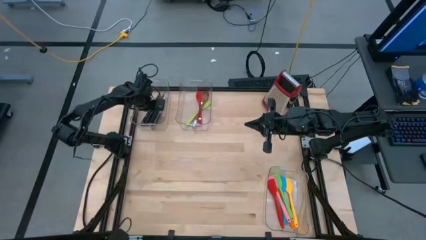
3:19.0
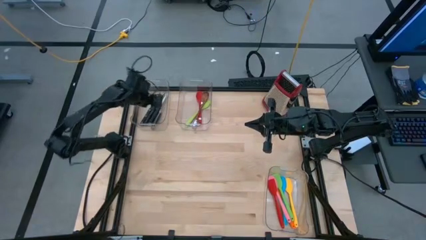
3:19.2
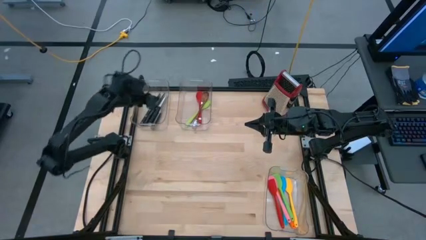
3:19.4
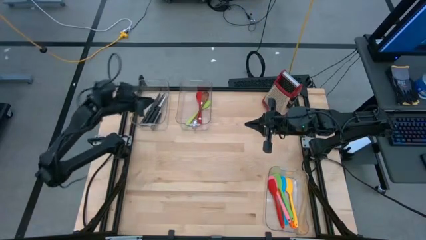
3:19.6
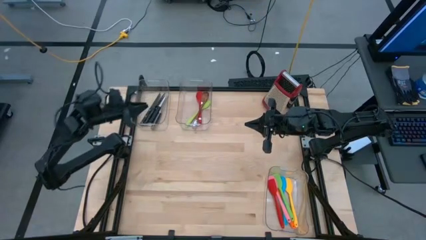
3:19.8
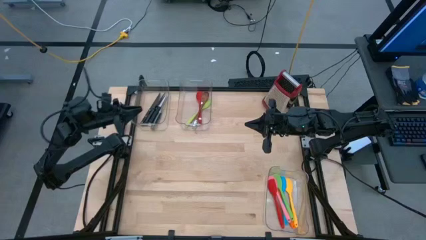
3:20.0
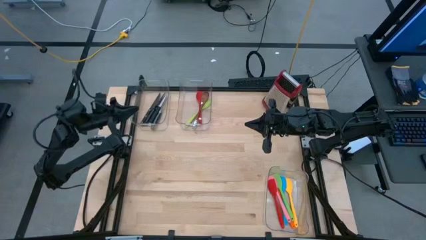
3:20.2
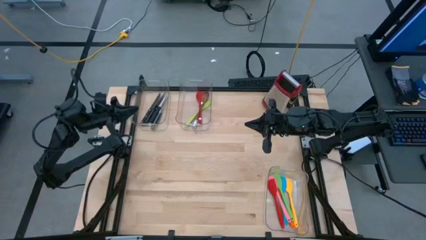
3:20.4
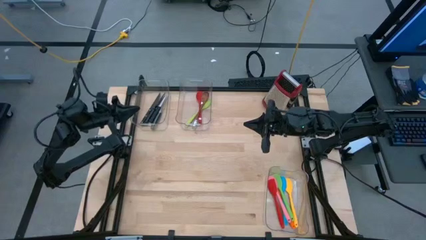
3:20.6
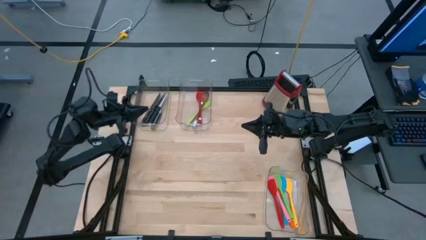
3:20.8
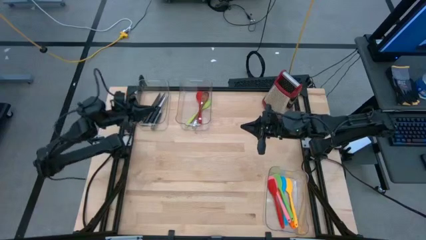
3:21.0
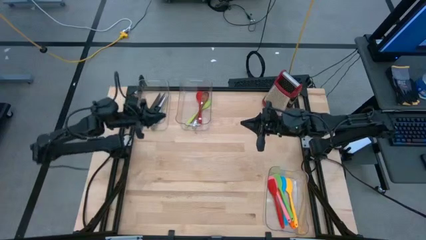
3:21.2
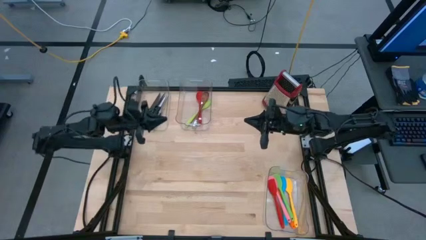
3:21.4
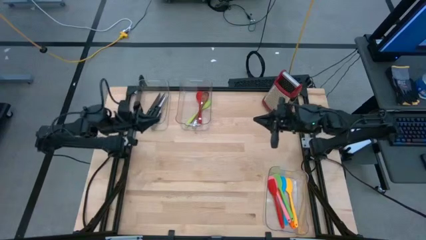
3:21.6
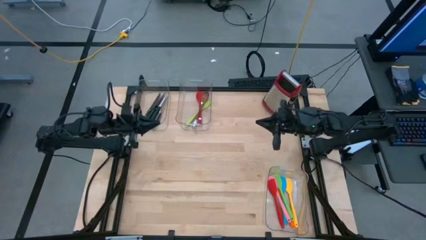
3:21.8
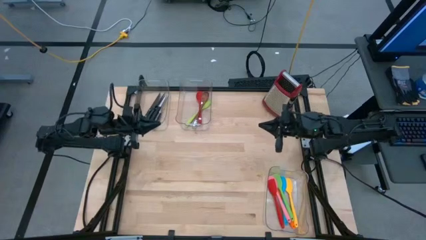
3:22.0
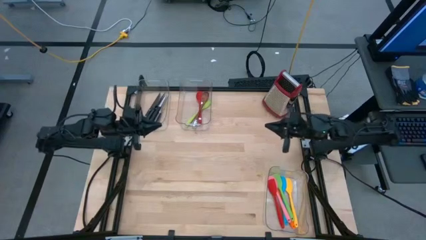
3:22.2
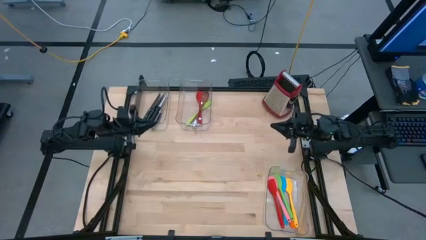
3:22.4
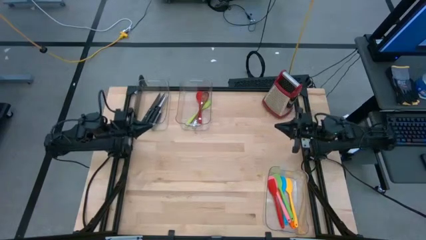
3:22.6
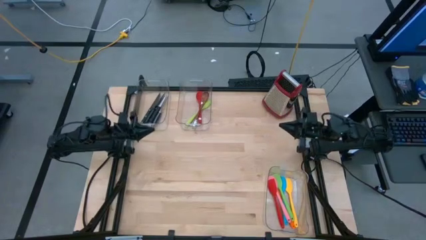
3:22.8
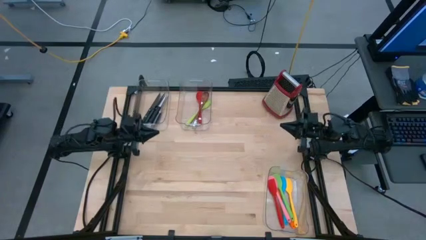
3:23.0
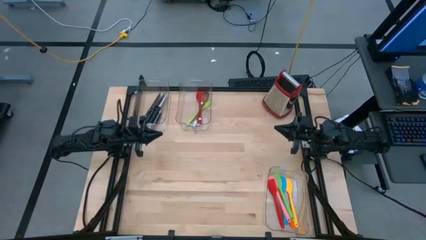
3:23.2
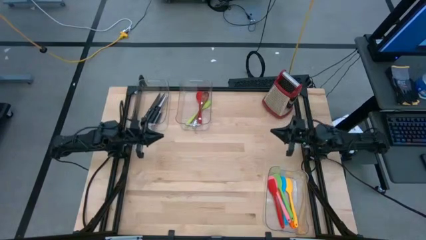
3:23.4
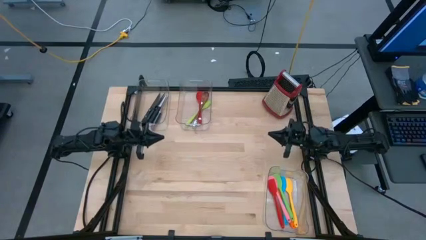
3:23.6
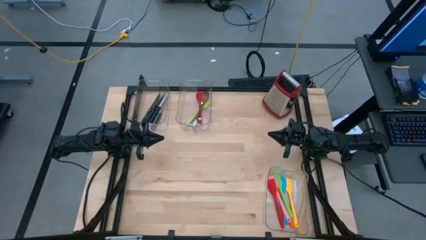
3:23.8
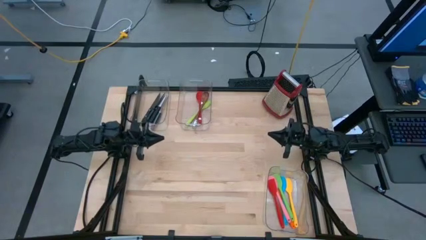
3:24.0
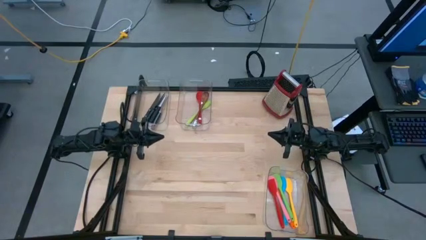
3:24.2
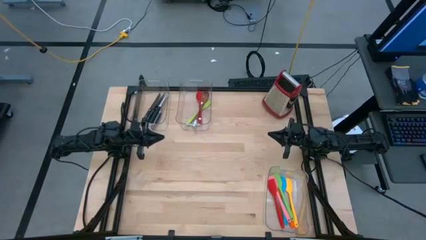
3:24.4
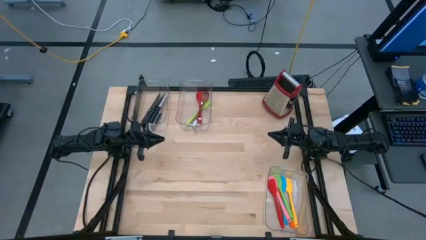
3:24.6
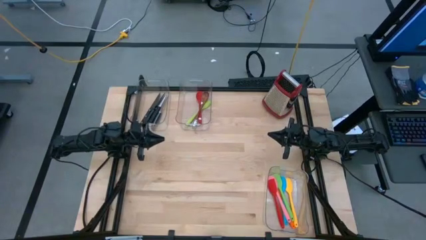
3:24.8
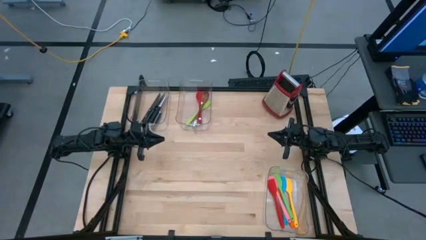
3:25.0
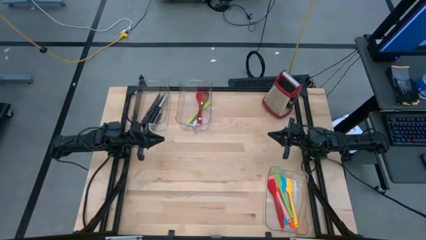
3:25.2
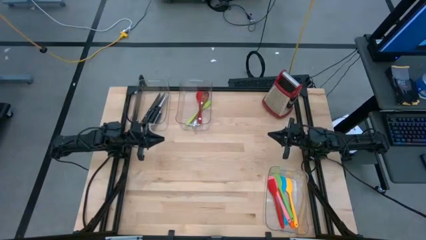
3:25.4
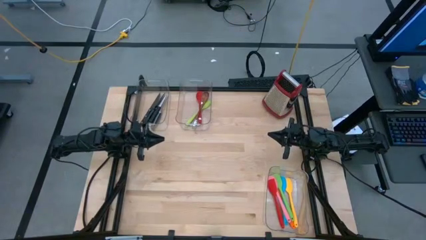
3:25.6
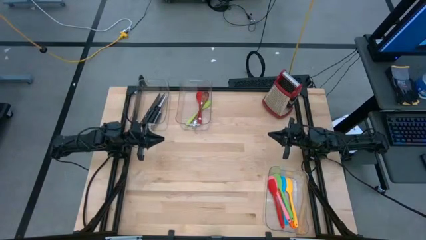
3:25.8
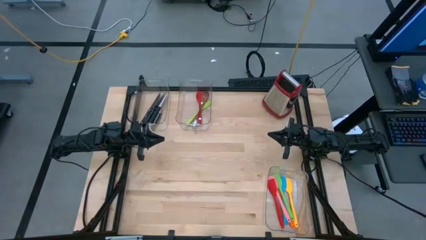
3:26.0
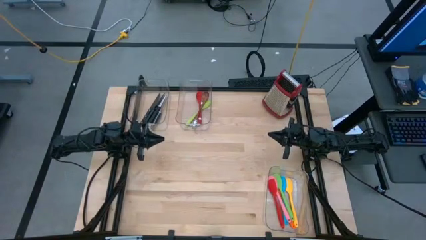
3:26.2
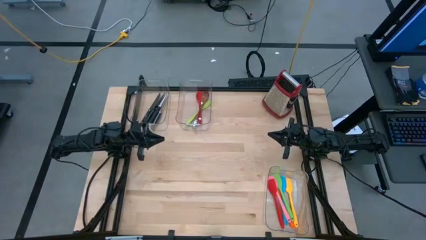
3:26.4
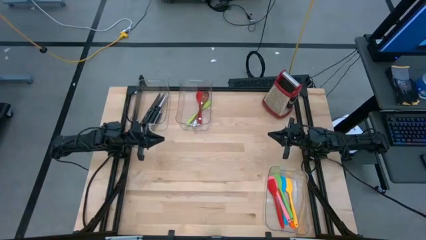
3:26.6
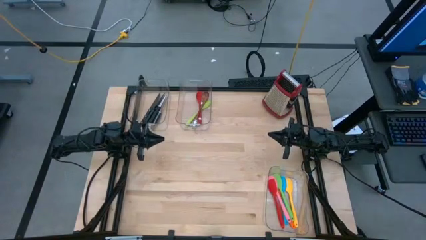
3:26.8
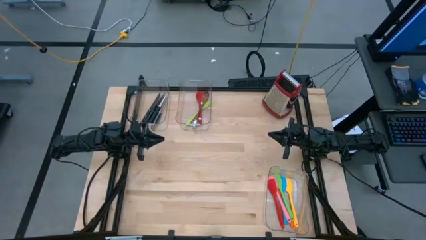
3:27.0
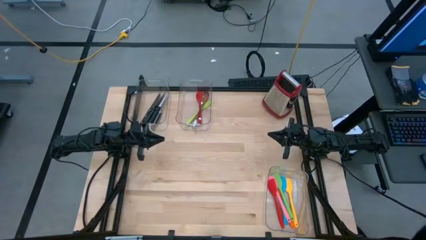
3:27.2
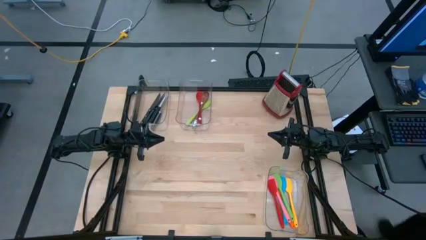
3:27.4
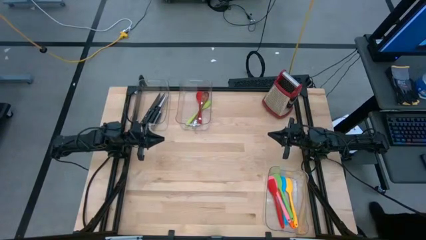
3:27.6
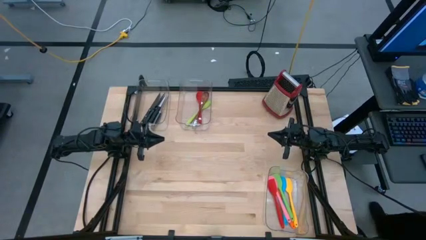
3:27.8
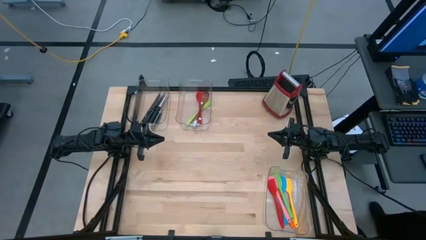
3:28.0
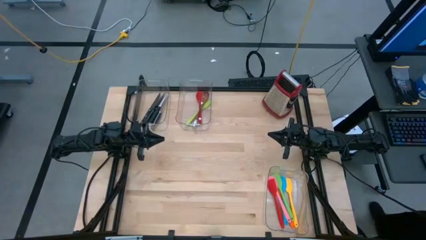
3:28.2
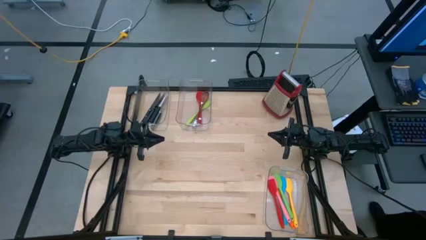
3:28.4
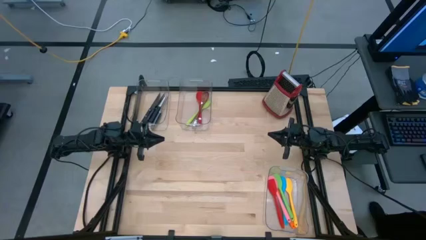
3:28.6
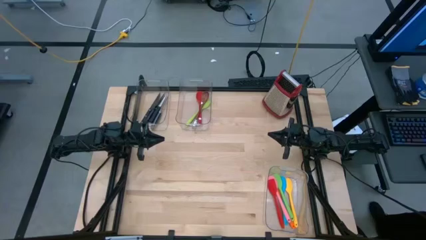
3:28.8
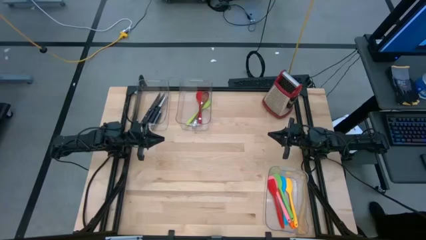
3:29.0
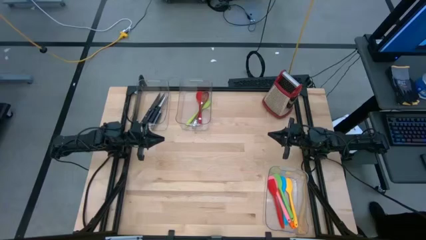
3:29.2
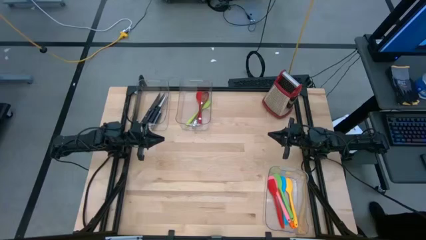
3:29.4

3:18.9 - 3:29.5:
Task: Pick & Place Kitchen Items
Return to Home Position
